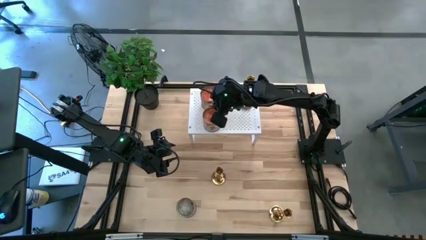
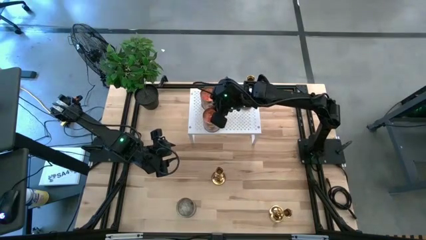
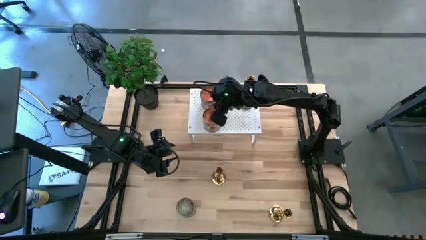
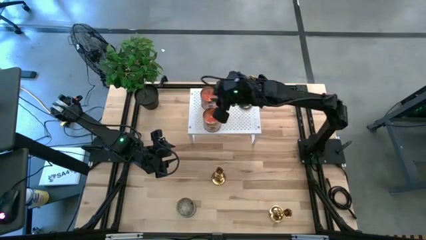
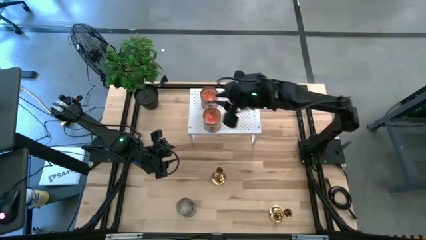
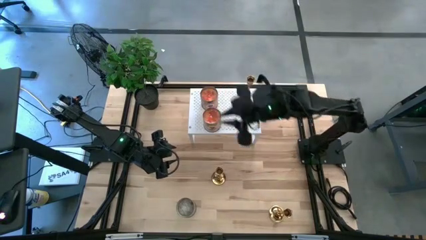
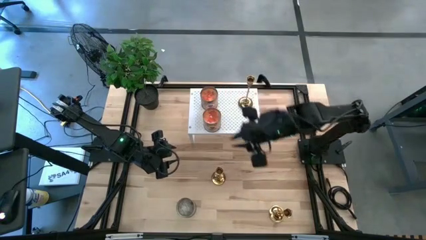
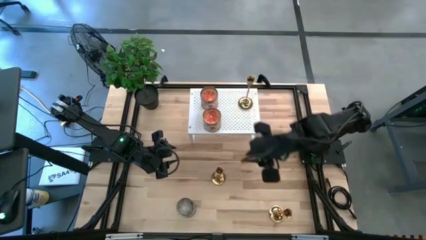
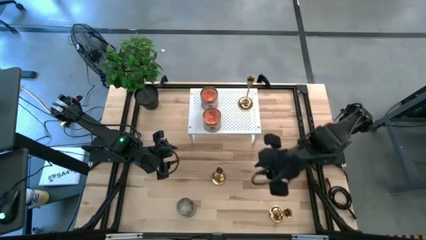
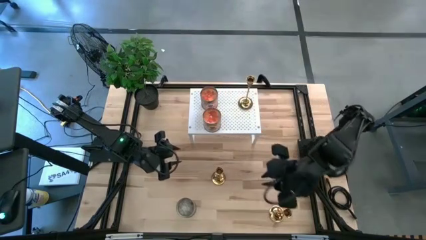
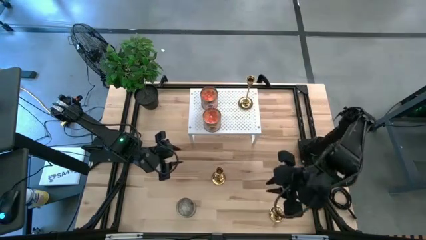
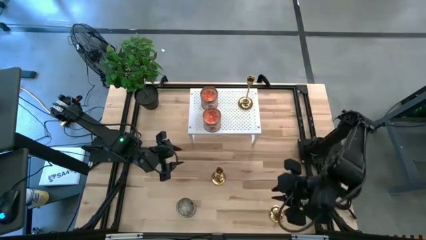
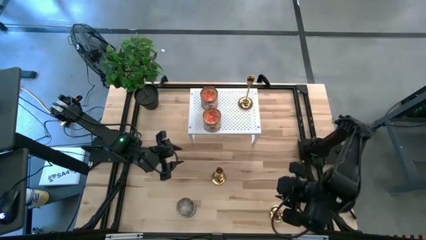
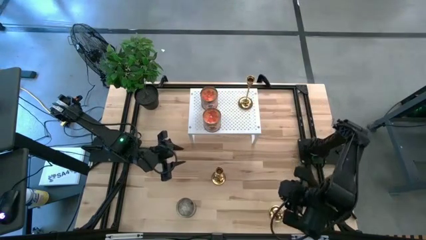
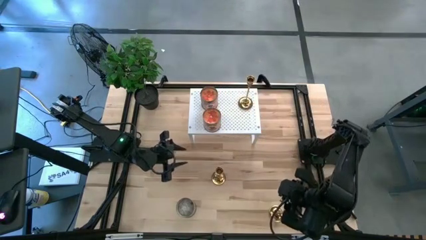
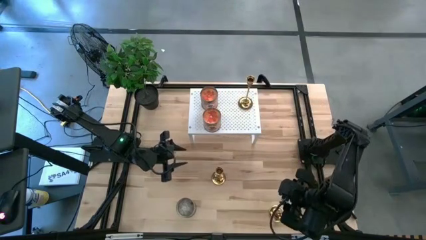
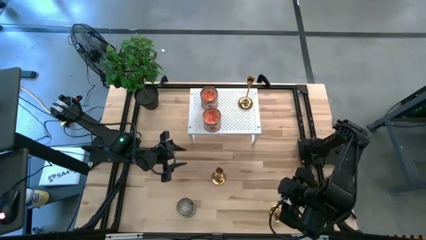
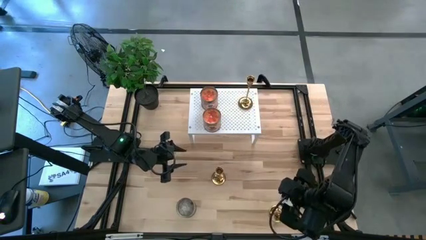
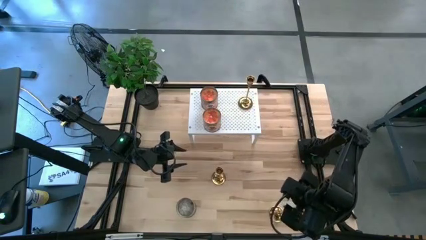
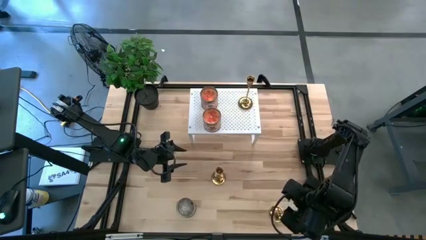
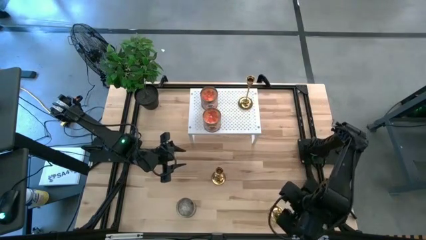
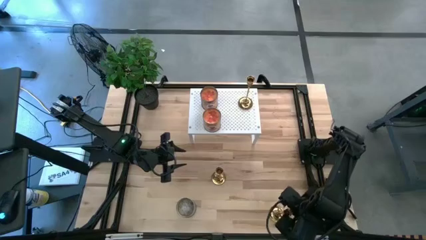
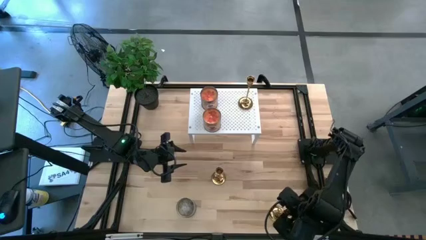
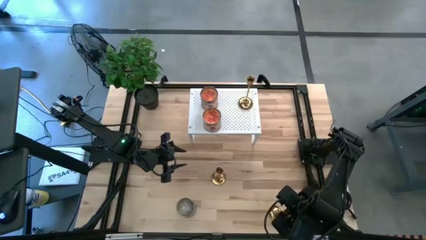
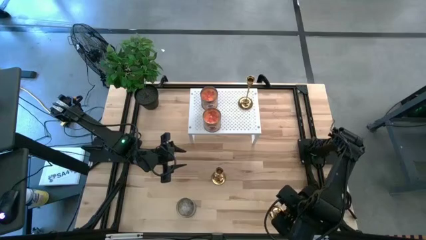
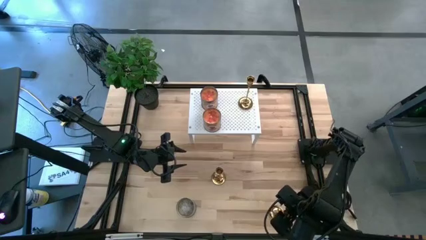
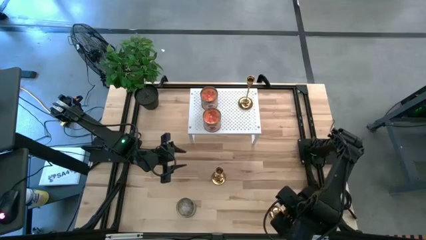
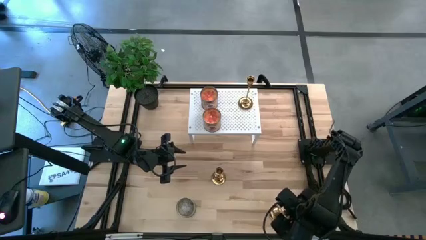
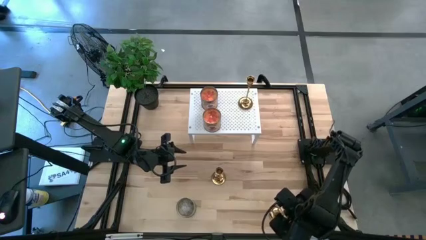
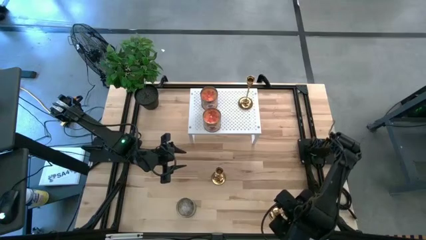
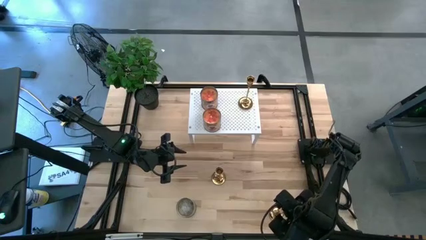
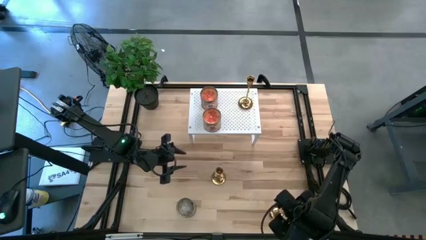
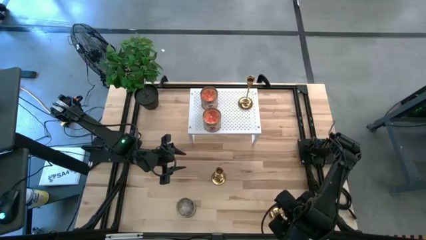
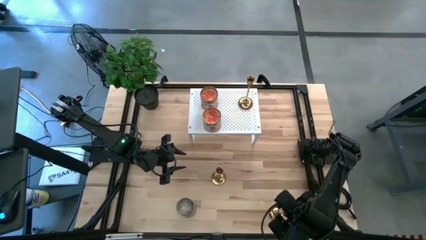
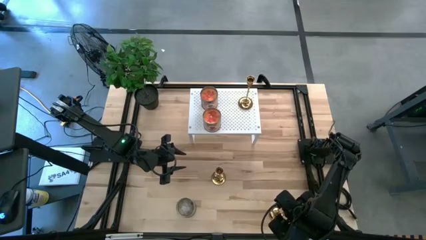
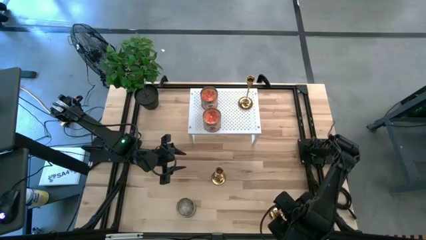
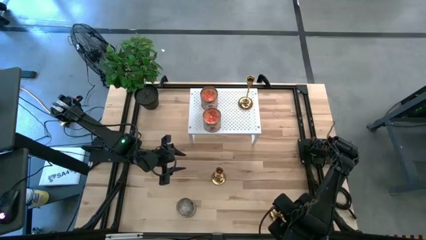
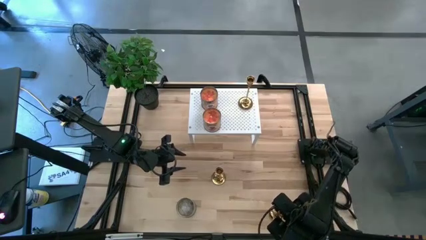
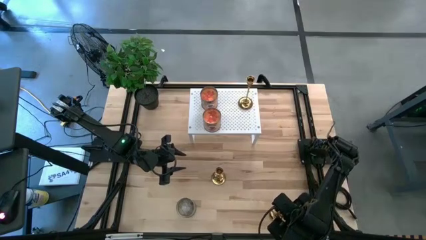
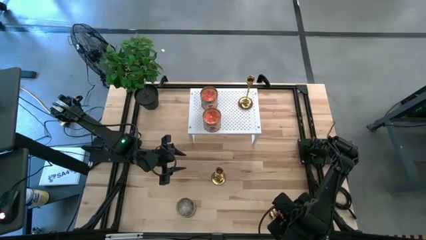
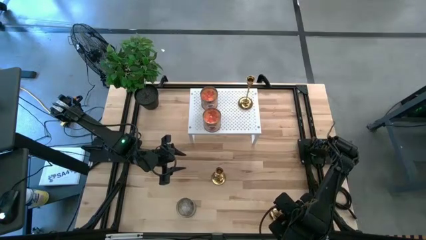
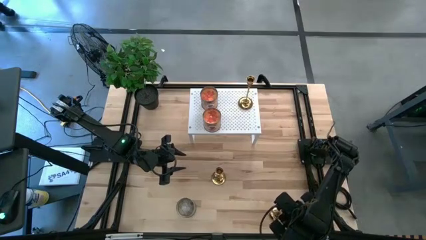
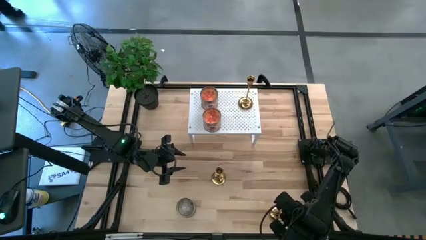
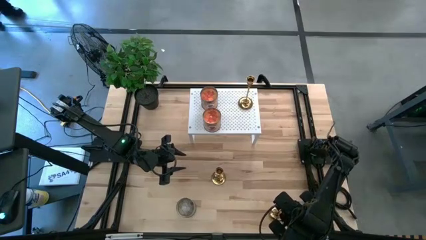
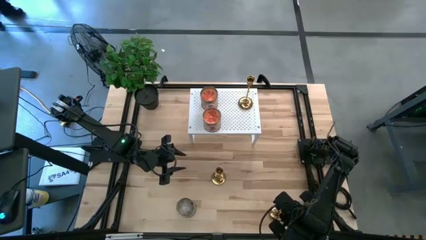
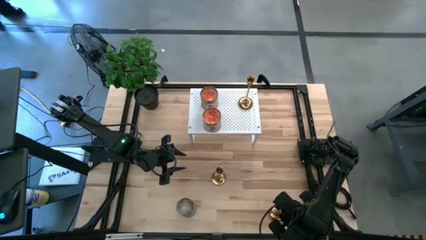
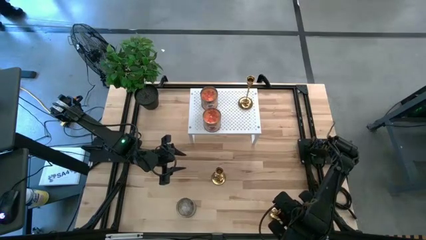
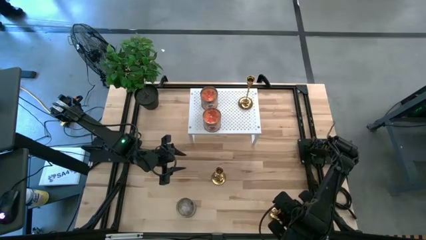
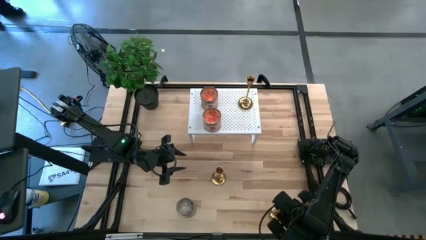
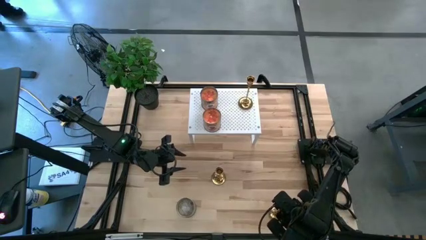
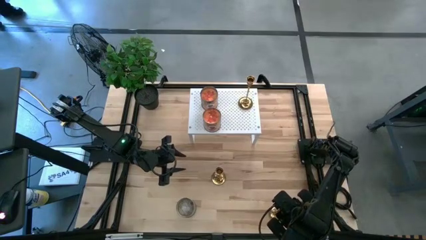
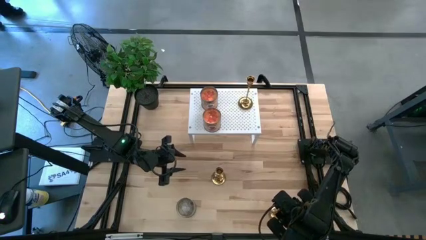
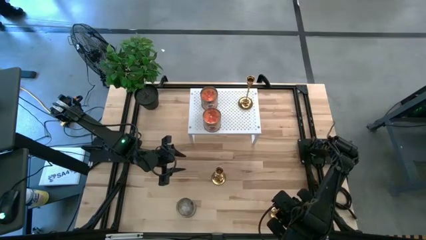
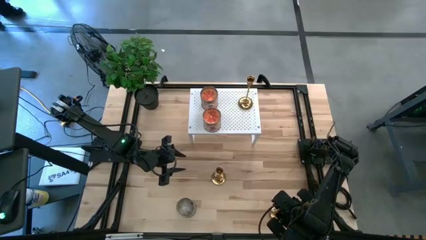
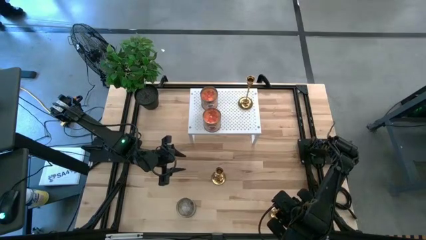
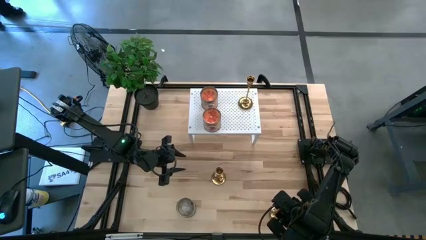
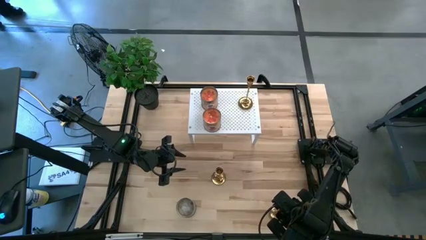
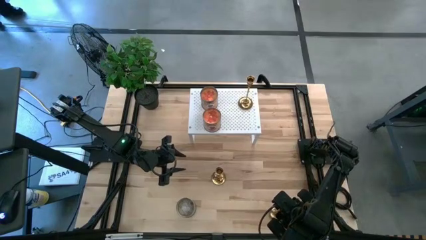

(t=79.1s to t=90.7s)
Task: Pick & Place candle stick holders
Put the bottom gold candle holder on the shelf

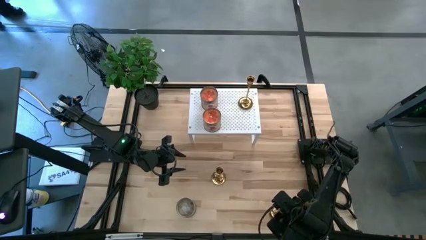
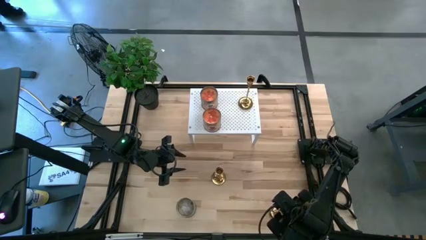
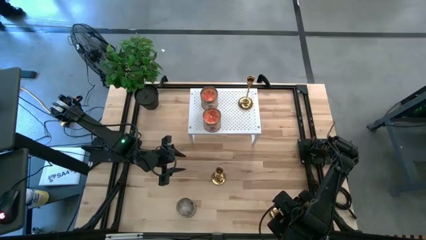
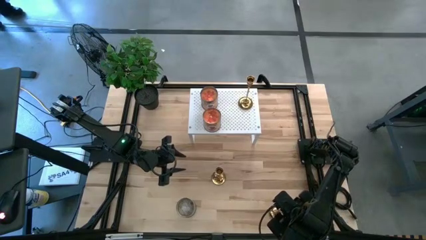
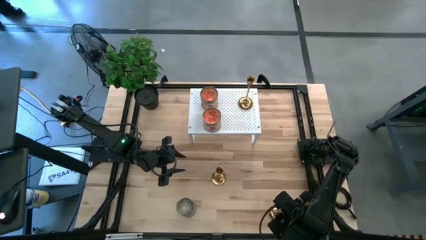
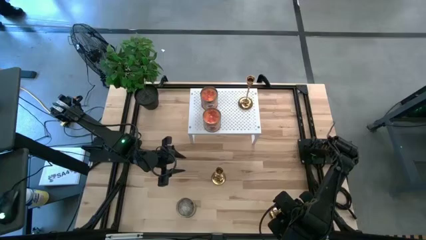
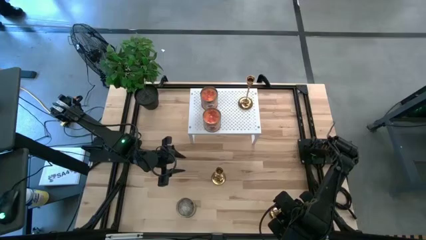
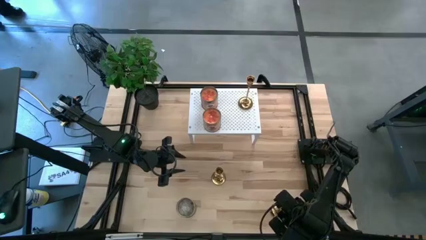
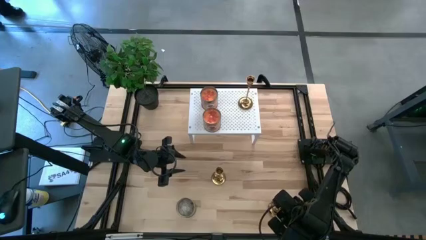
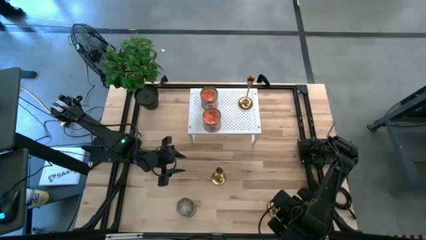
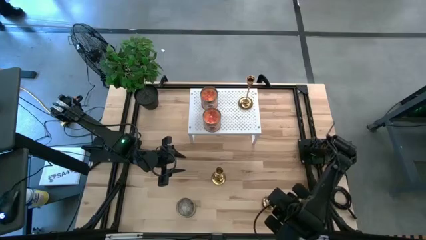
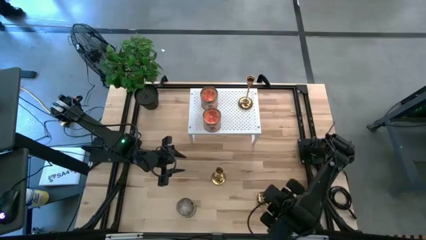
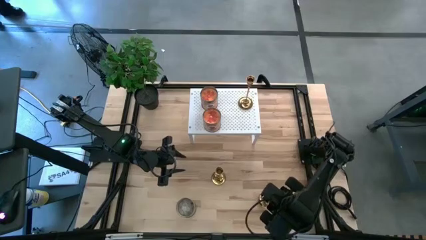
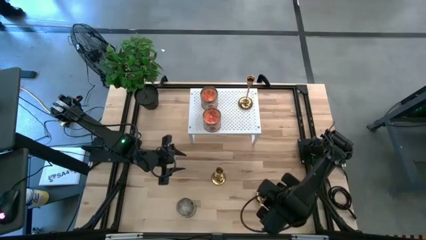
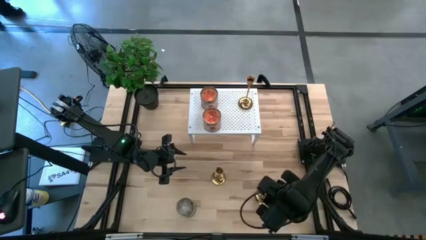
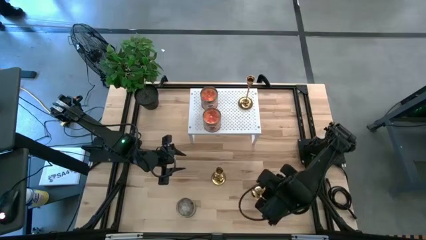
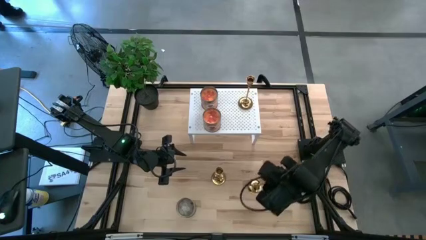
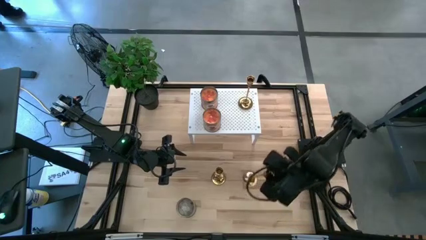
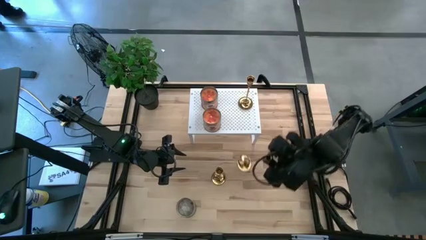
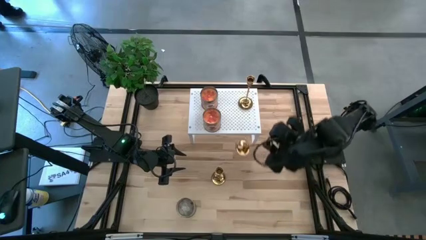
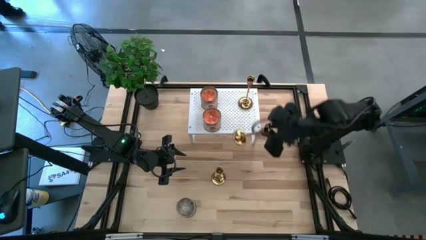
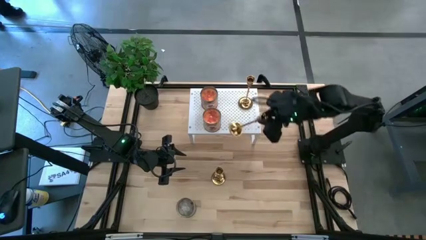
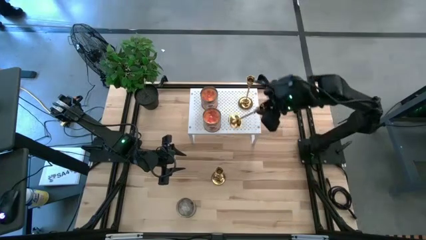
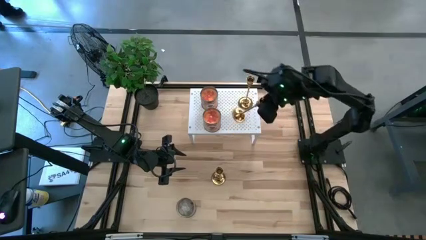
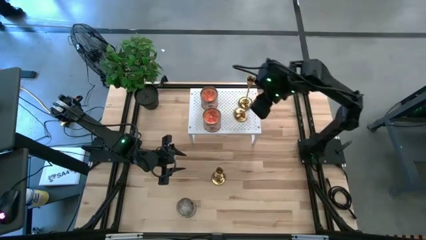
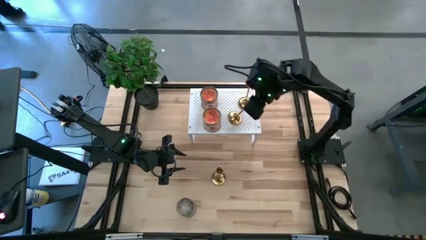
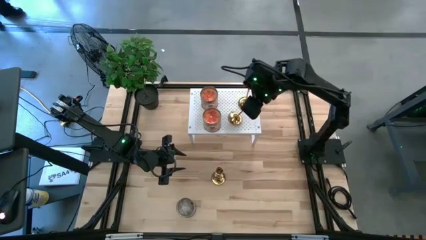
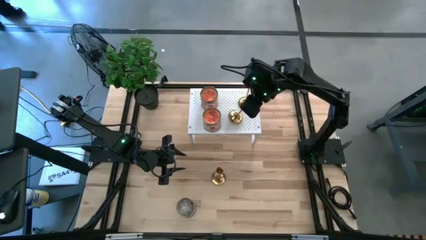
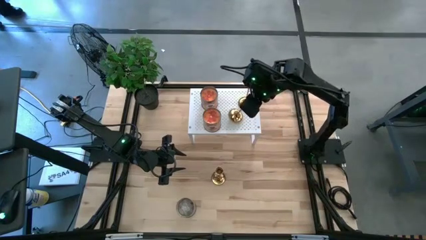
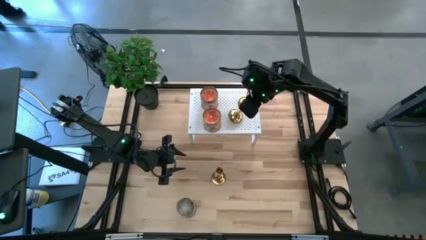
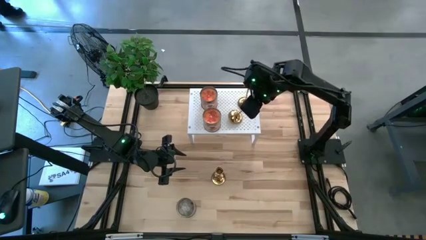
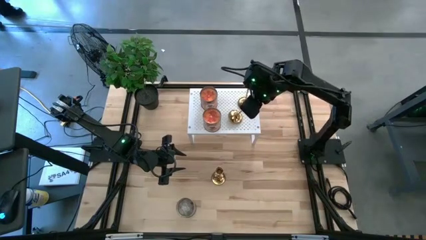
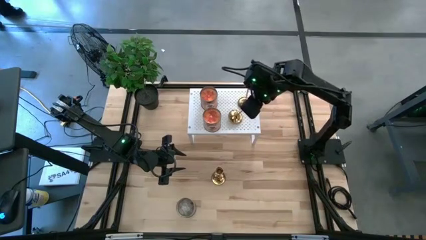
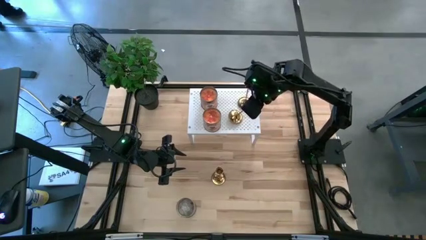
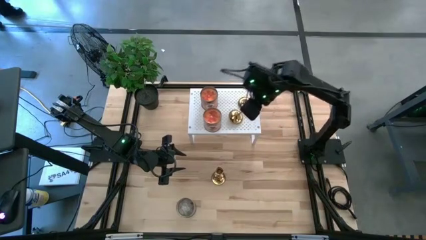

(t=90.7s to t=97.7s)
Put the bottom gold candle holder on the shelf
